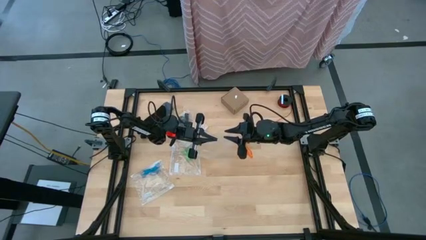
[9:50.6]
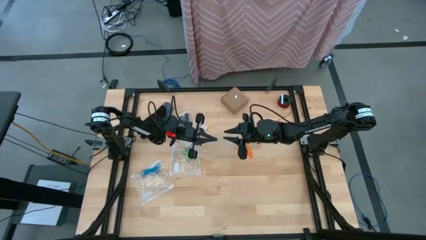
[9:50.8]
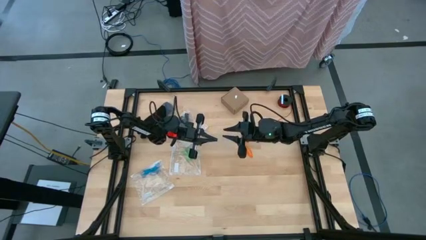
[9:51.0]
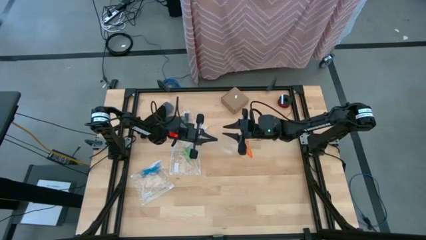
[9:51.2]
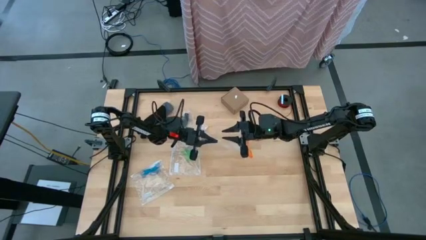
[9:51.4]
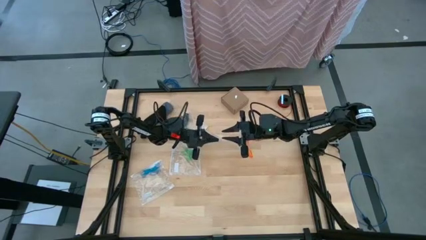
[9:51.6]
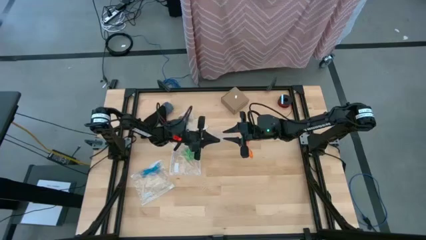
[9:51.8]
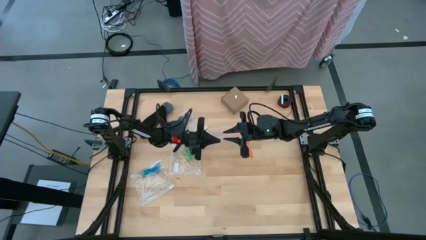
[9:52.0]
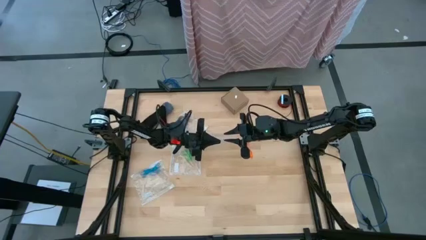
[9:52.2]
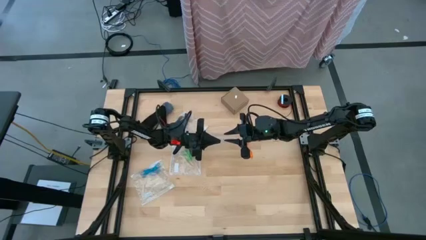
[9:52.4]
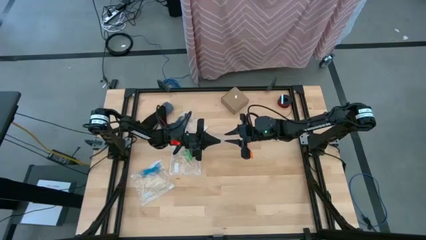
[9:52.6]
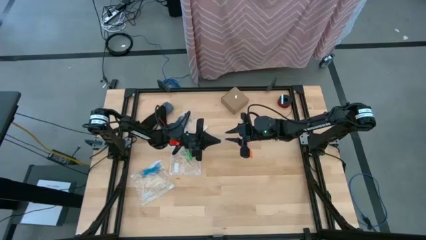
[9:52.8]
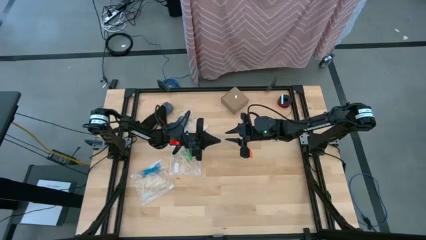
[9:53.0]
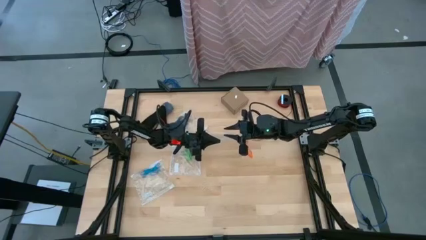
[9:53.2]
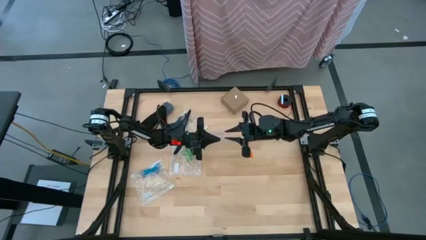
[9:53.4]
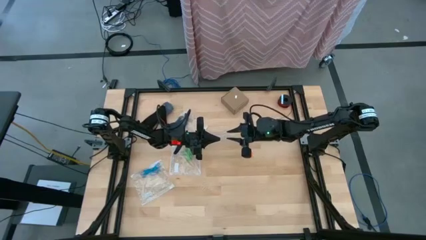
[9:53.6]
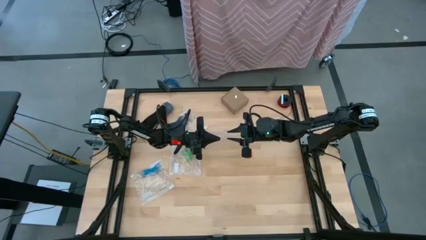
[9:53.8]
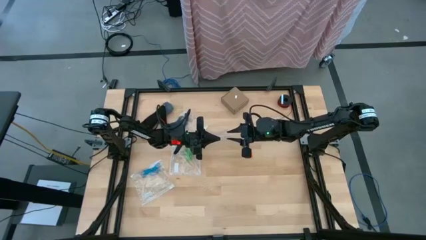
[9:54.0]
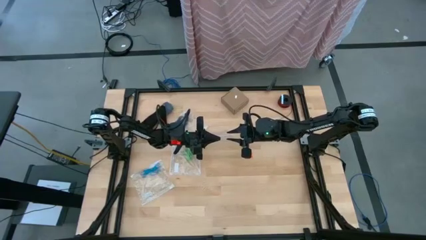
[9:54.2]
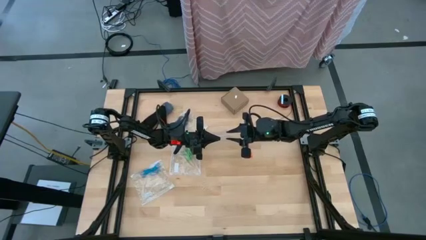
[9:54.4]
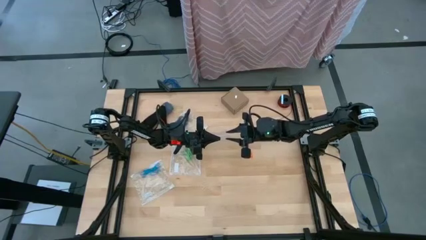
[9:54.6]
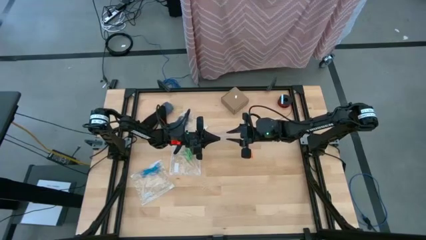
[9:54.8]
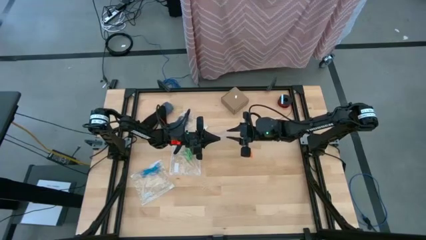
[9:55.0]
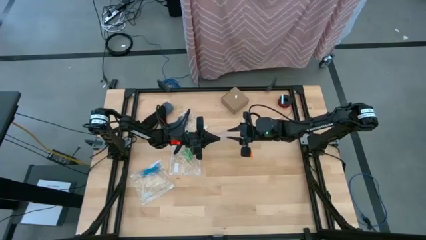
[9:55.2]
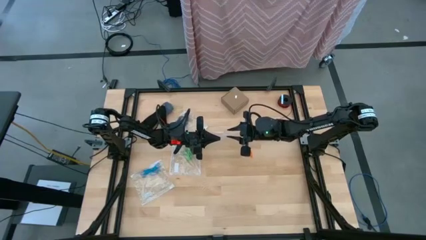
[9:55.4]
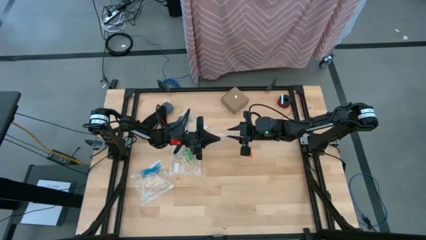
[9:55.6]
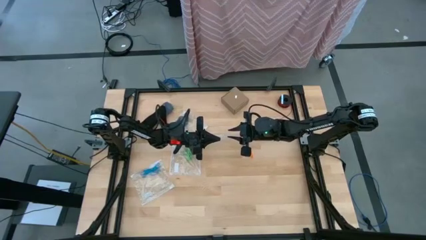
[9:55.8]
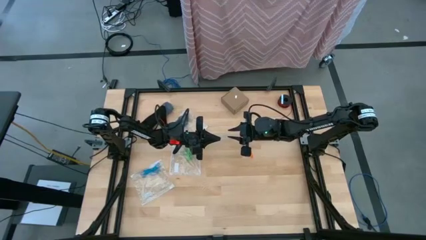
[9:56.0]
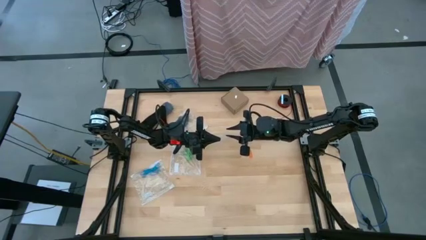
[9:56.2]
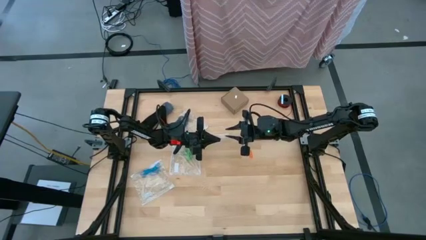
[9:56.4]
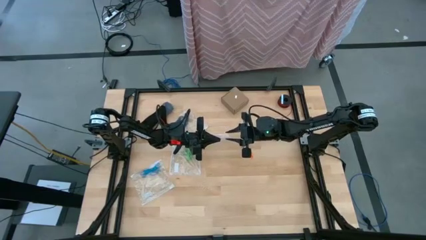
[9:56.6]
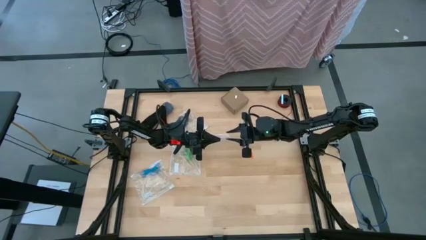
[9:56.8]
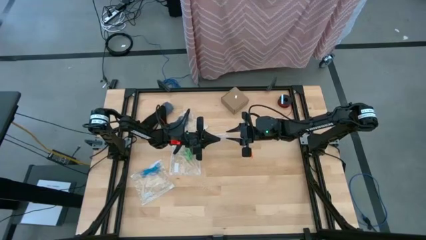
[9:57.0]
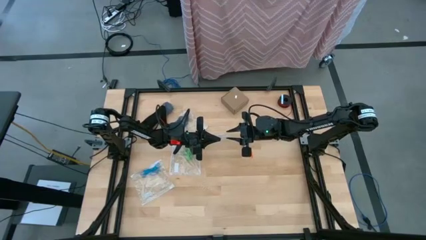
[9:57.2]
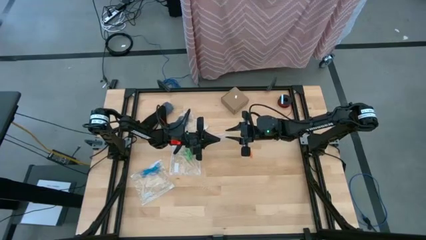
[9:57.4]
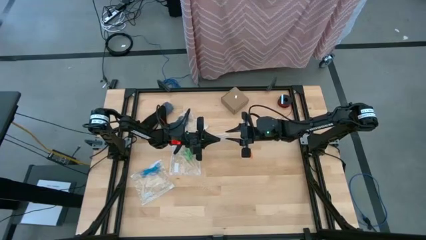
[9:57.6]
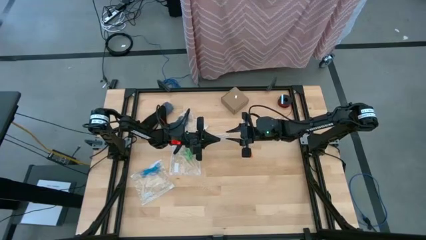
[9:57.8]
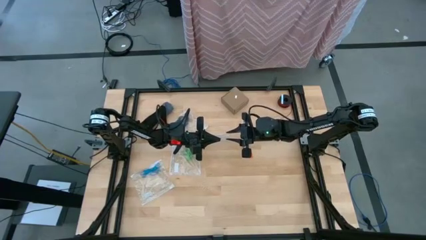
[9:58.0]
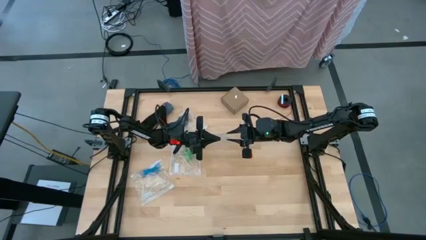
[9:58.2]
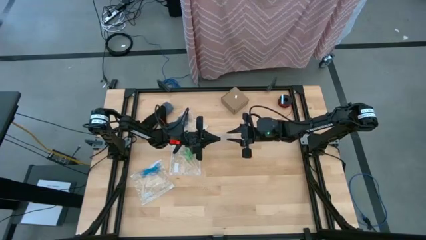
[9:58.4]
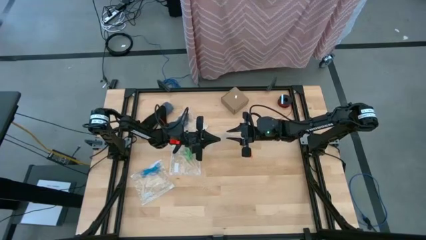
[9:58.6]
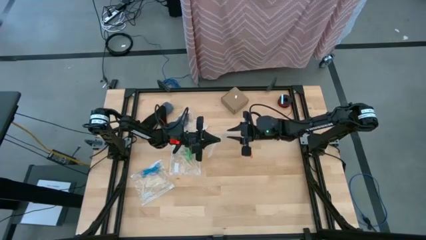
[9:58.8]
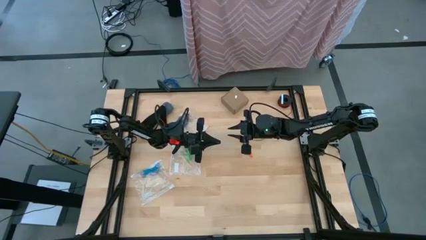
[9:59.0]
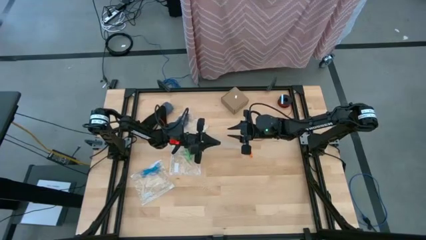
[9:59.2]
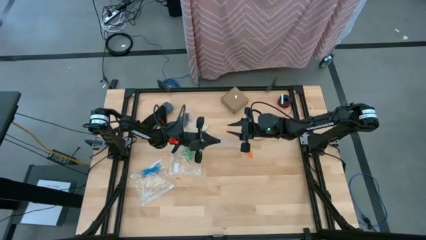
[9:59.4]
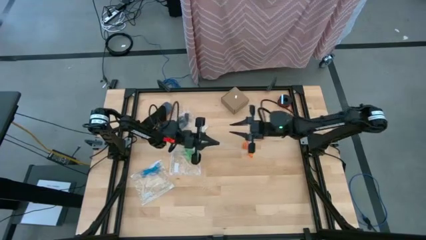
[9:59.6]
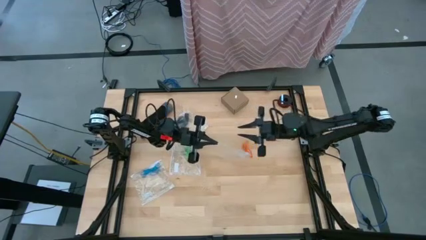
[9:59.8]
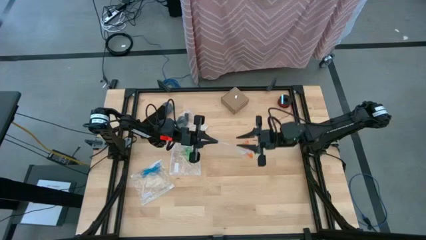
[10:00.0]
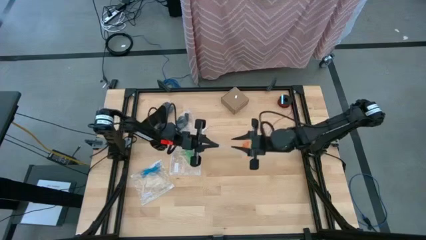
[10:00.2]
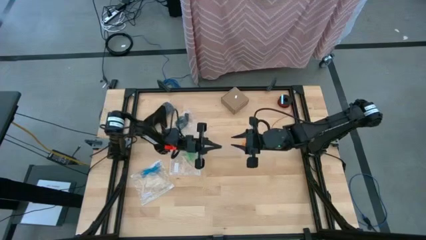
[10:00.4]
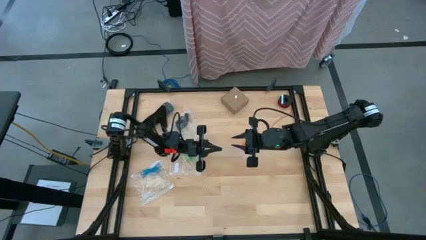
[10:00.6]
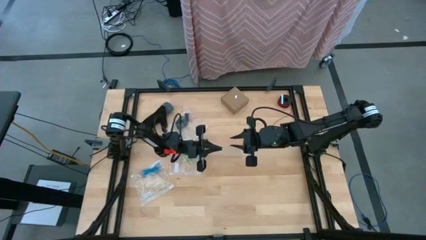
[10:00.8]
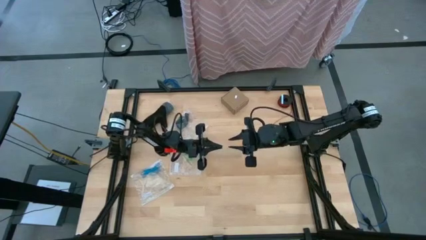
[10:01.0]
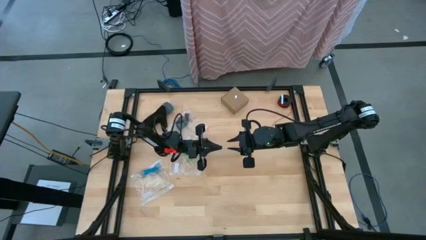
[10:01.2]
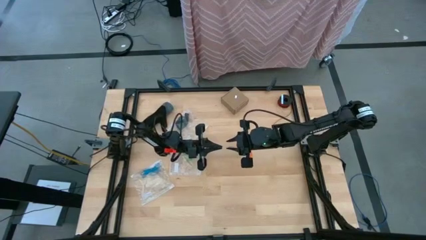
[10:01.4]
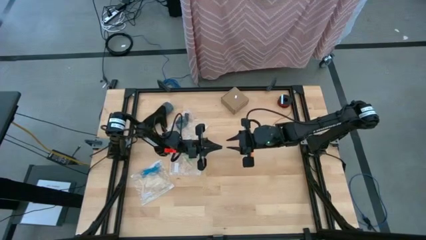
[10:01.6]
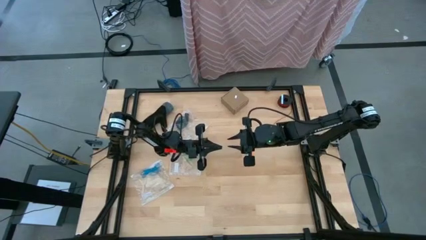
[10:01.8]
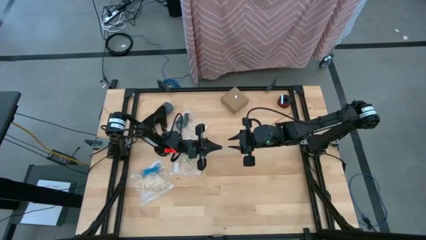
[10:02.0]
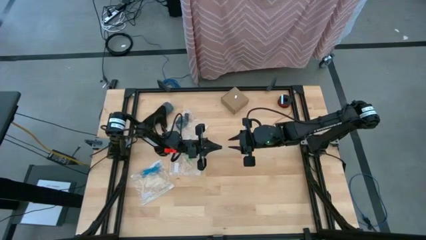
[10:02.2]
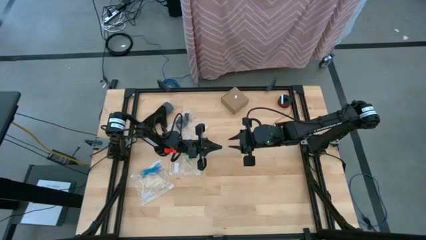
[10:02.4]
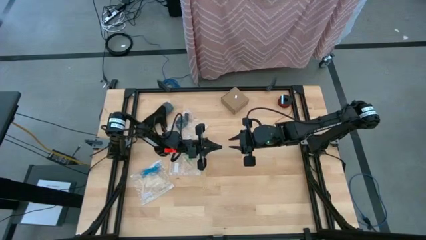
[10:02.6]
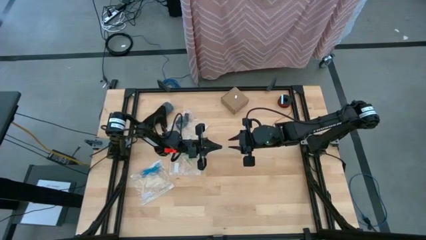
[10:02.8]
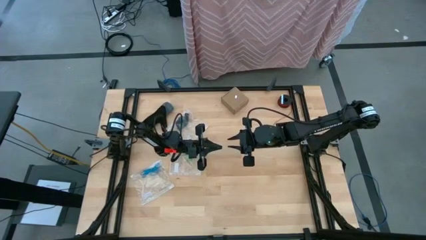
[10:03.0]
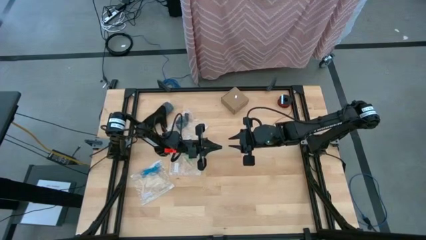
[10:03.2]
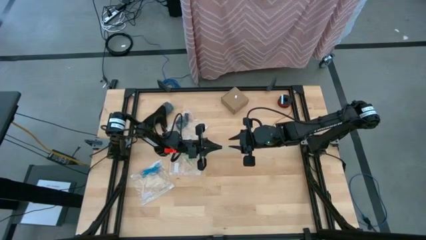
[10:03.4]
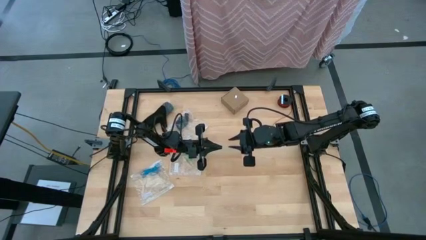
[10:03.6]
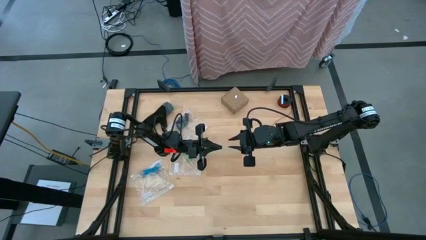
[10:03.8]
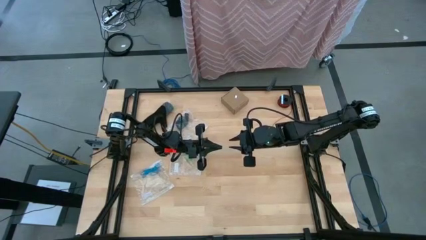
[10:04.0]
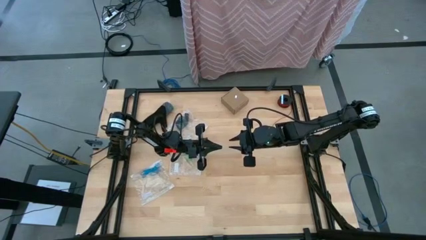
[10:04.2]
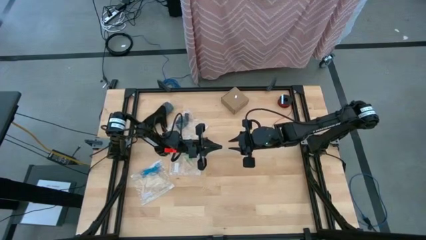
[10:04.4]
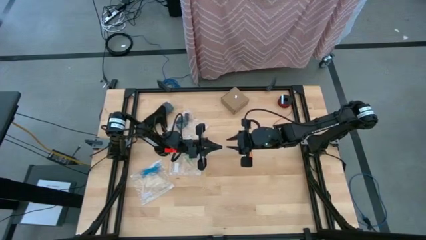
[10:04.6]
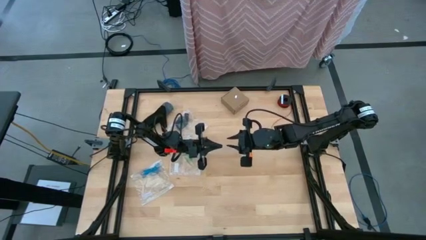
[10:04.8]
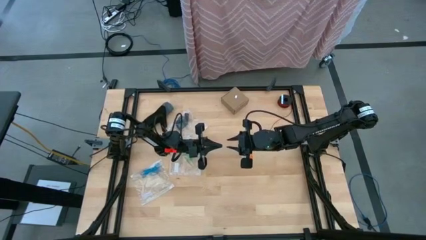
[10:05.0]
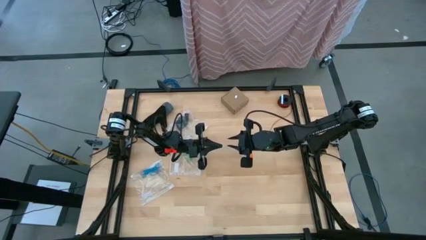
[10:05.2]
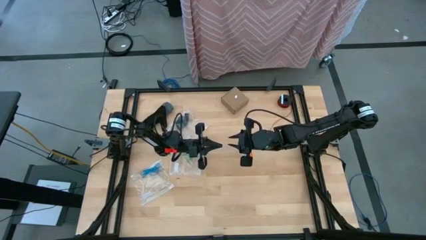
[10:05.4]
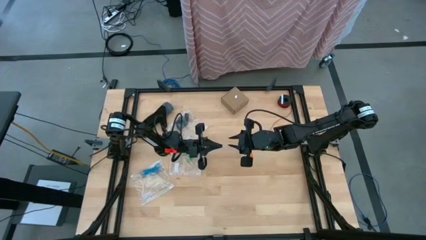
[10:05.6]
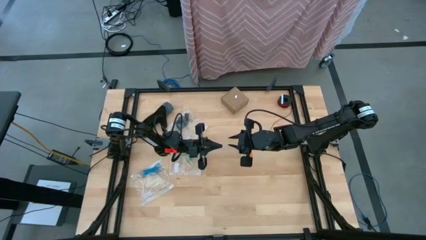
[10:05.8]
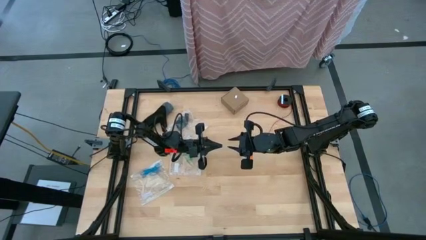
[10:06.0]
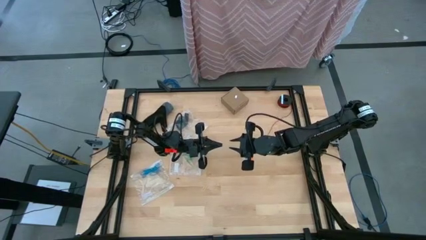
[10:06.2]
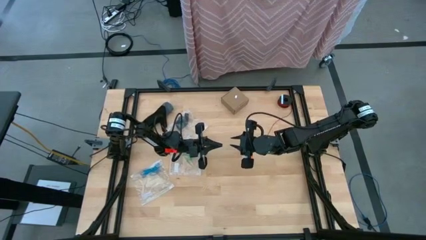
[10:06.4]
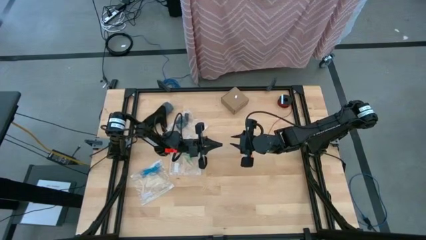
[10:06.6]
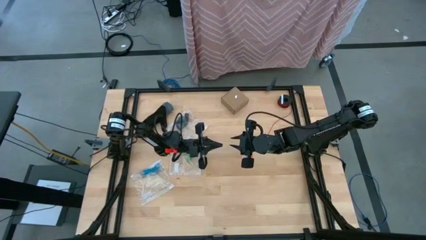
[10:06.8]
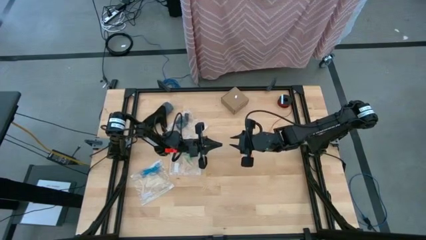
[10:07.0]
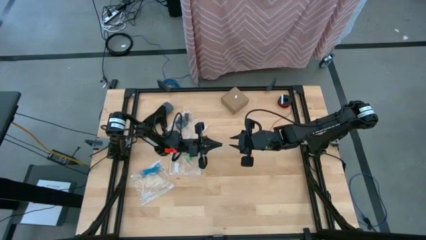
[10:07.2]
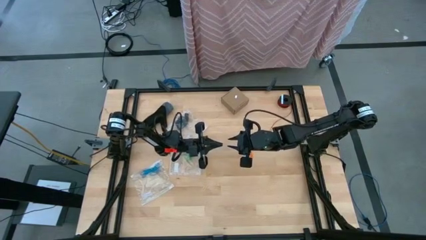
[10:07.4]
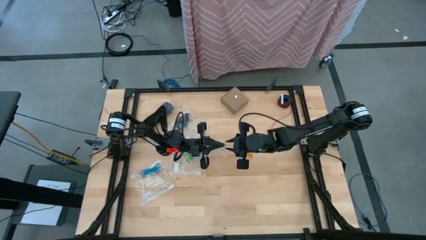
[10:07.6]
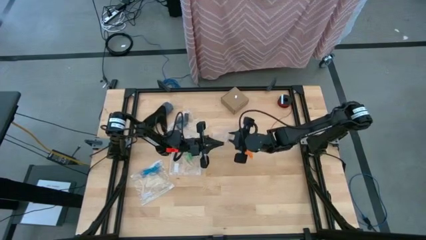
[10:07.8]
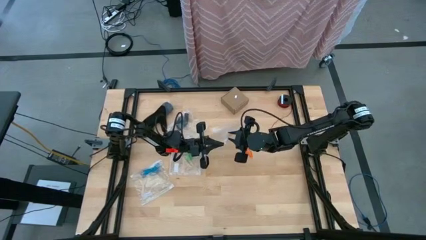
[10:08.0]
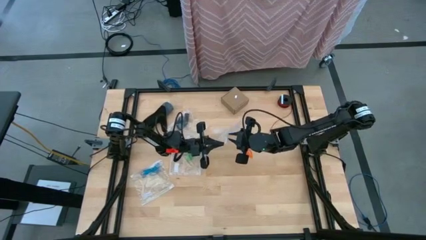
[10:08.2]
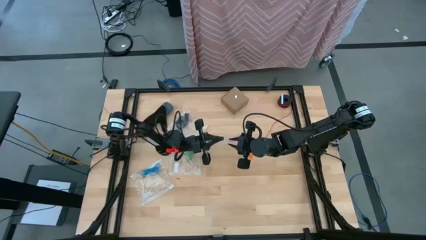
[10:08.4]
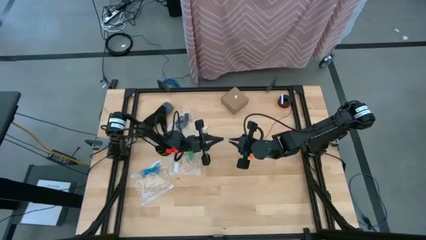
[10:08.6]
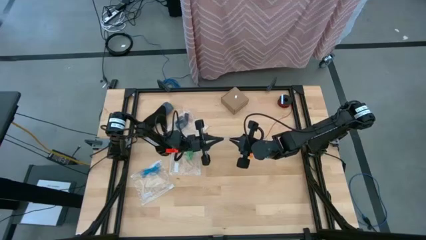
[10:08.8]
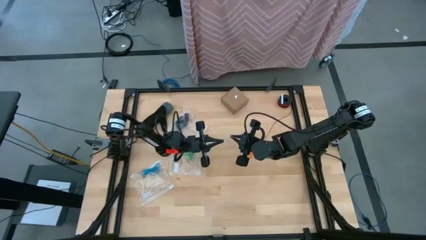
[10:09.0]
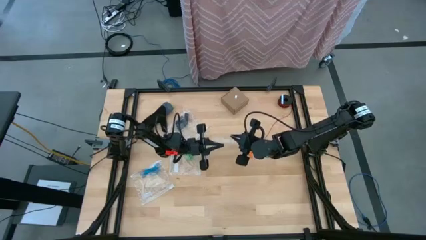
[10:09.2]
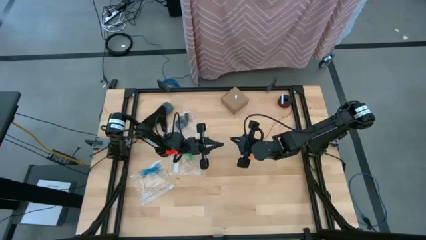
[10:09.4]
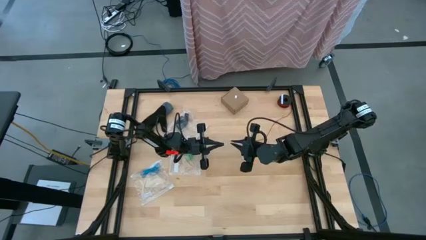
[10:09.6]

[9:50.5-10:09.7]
Task: Sort rubber bands
Open the transparent zip bag
